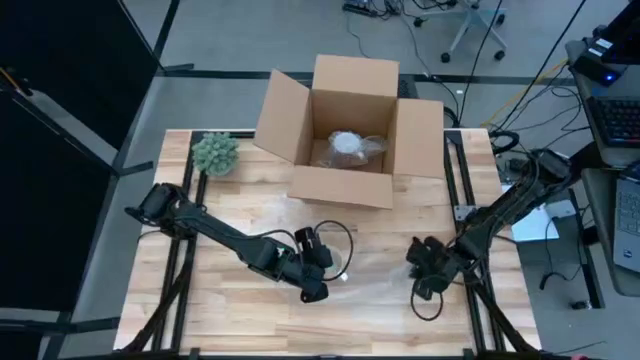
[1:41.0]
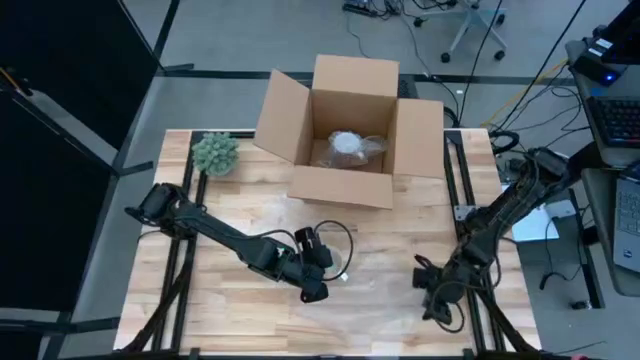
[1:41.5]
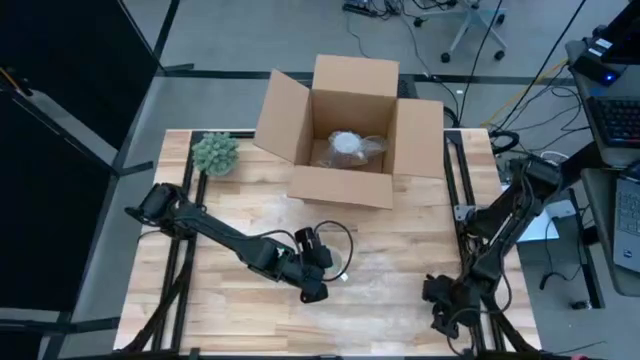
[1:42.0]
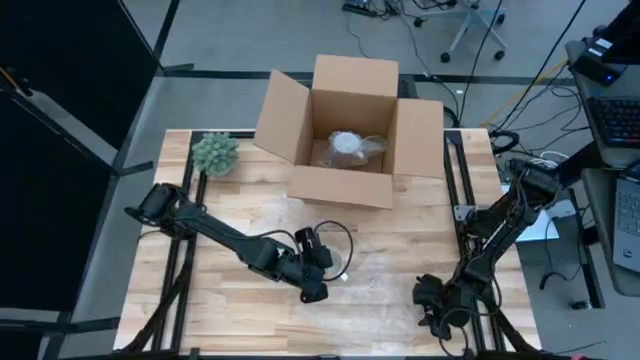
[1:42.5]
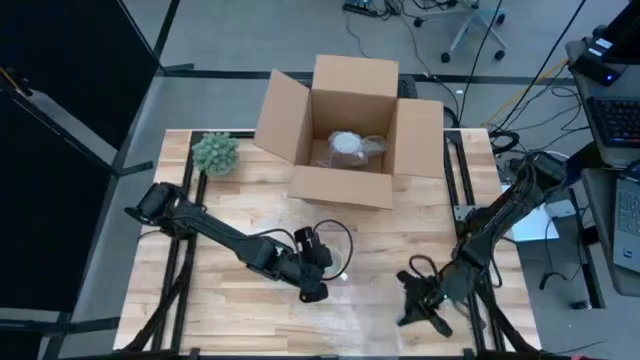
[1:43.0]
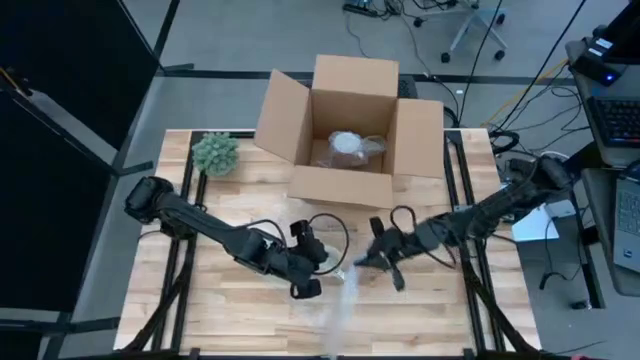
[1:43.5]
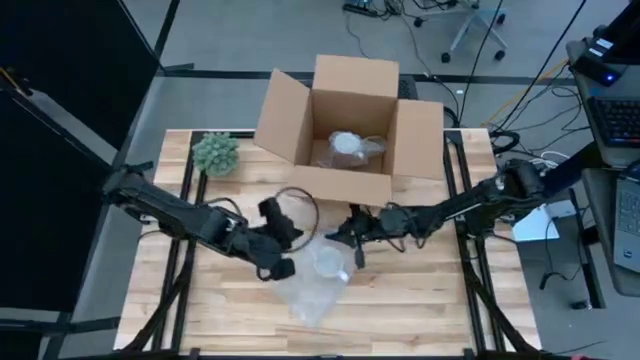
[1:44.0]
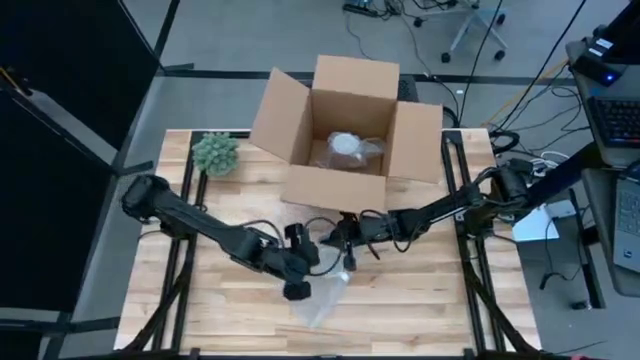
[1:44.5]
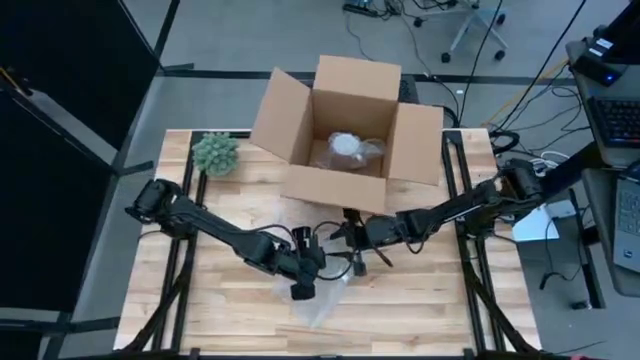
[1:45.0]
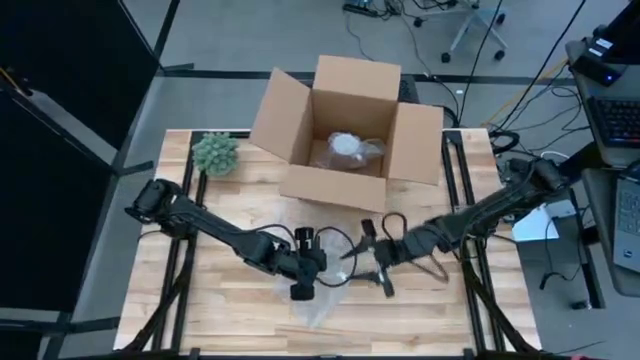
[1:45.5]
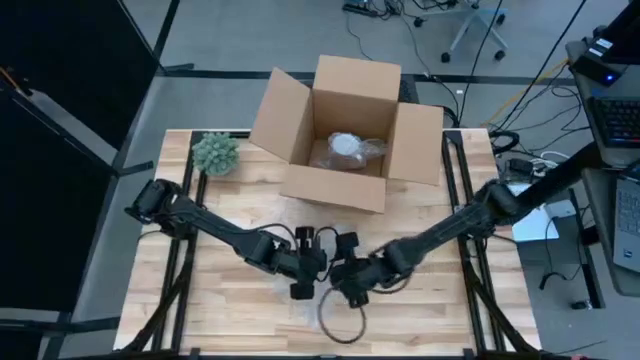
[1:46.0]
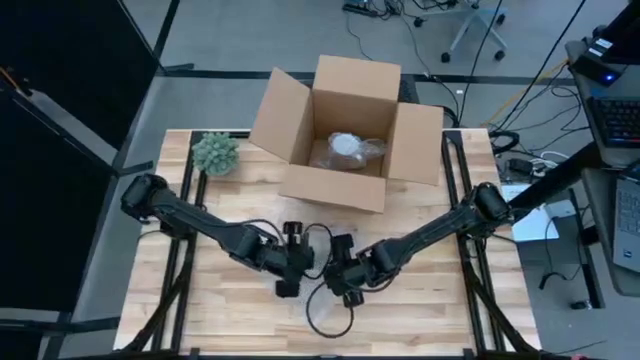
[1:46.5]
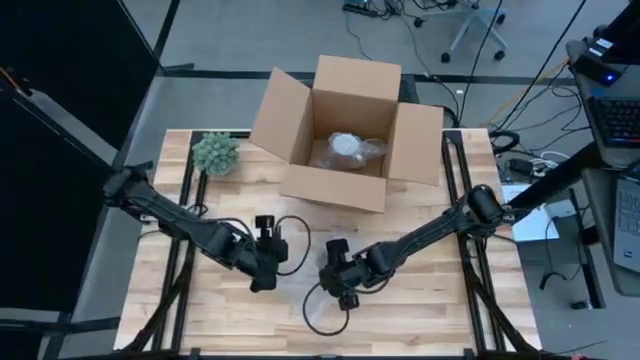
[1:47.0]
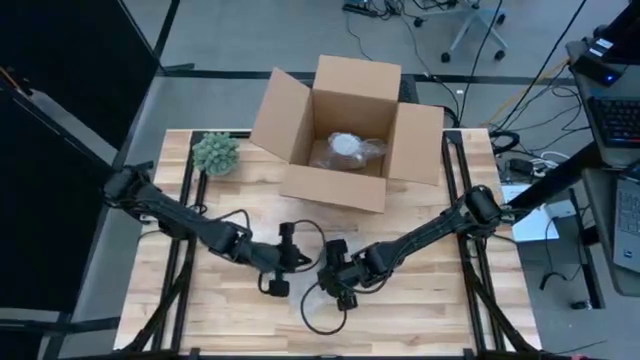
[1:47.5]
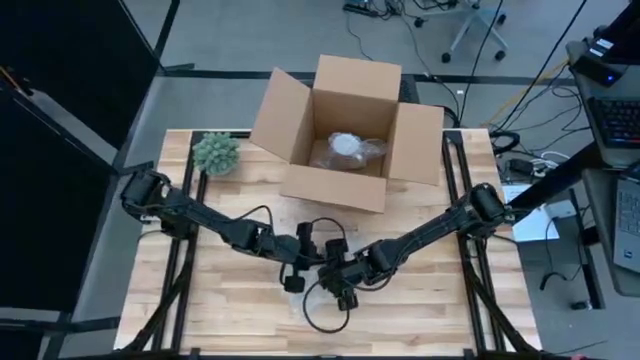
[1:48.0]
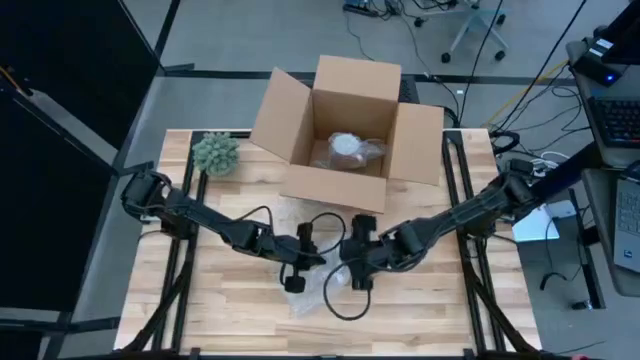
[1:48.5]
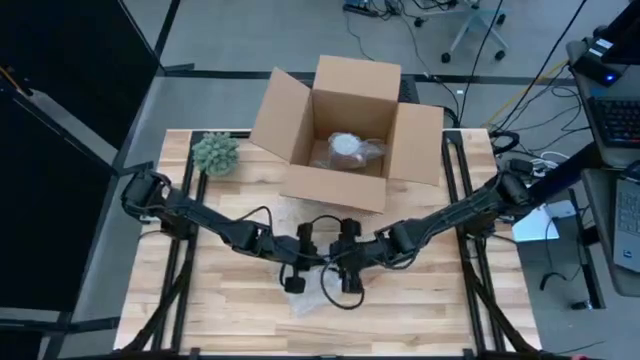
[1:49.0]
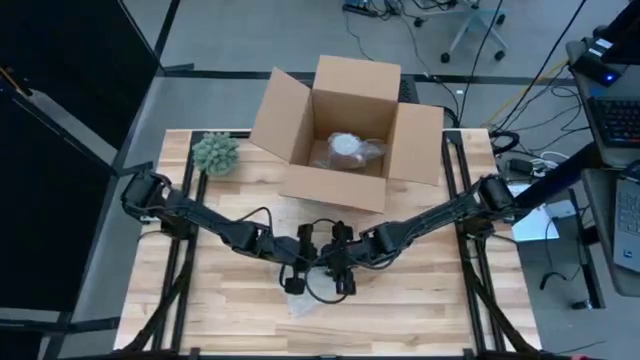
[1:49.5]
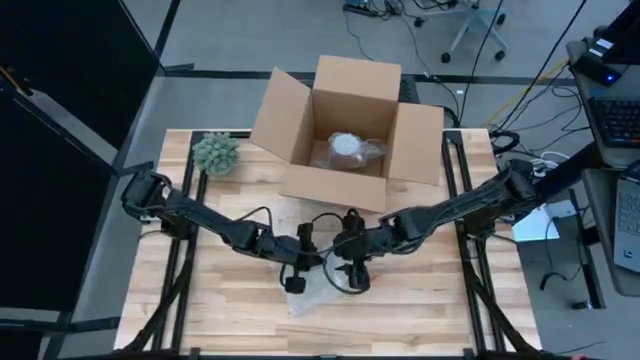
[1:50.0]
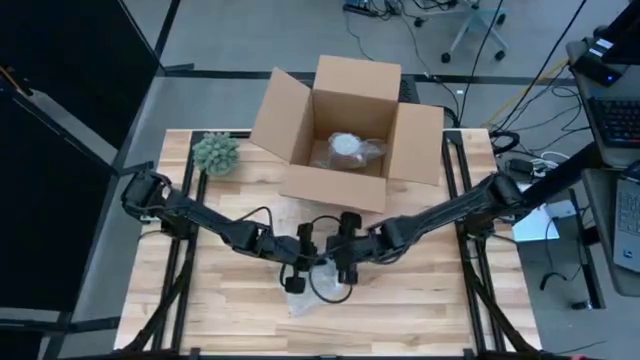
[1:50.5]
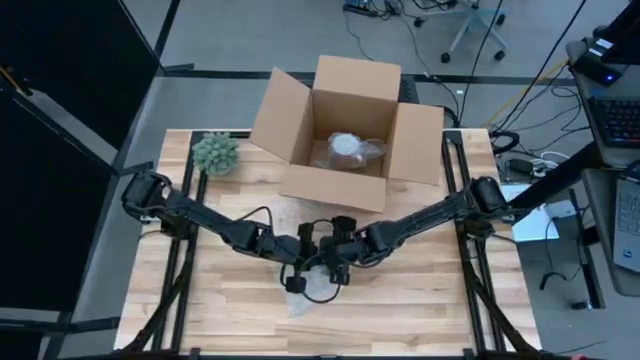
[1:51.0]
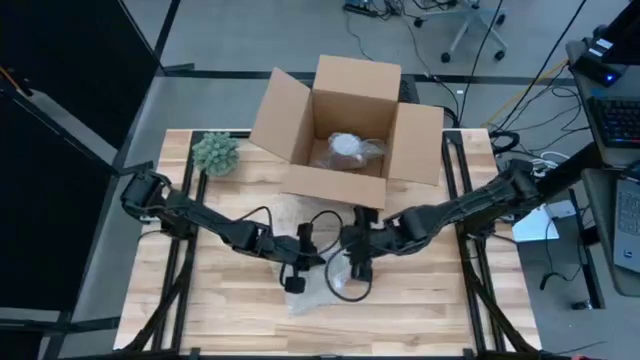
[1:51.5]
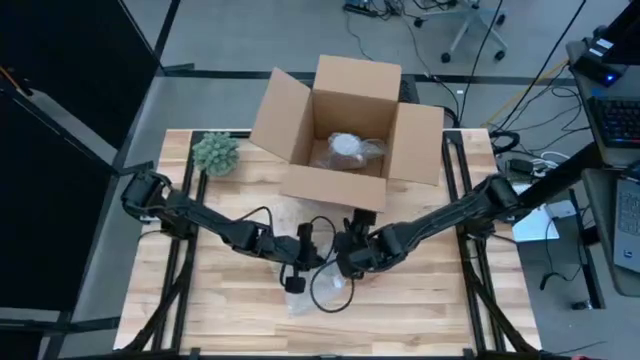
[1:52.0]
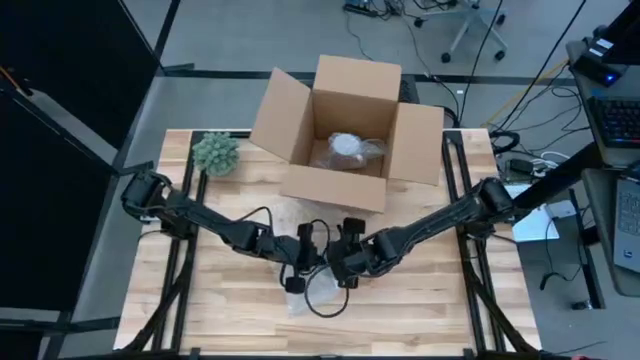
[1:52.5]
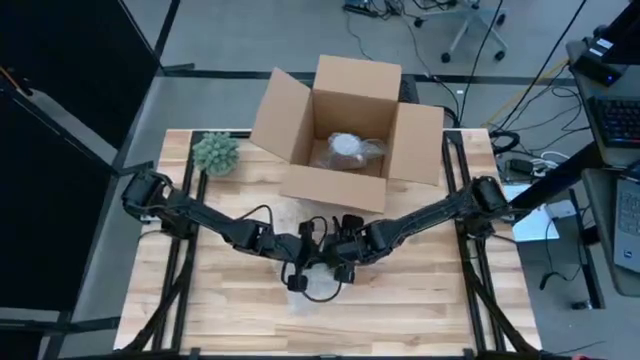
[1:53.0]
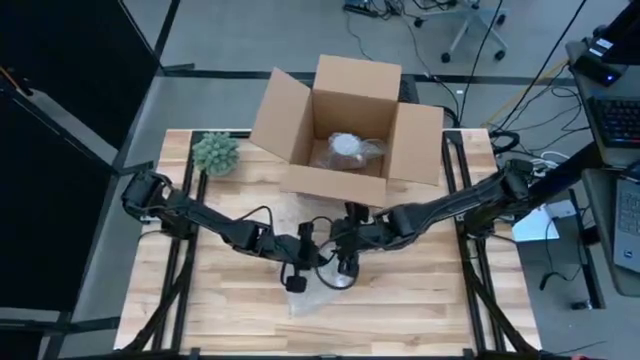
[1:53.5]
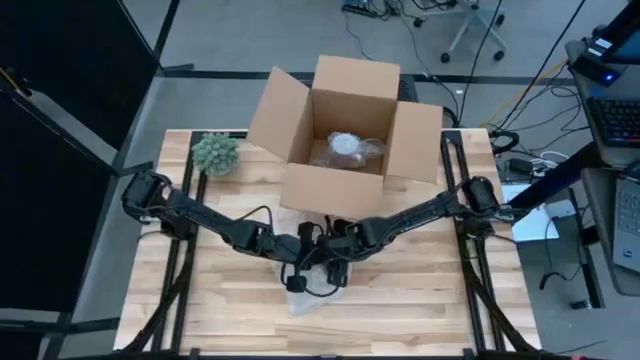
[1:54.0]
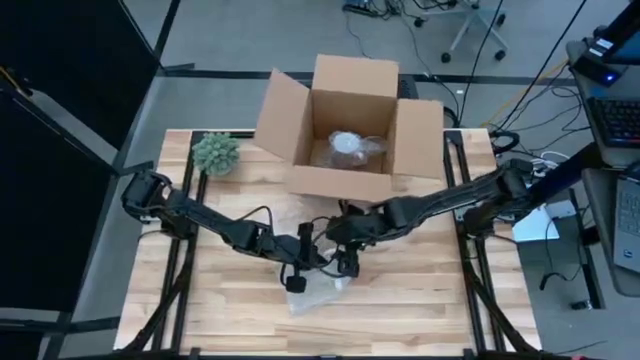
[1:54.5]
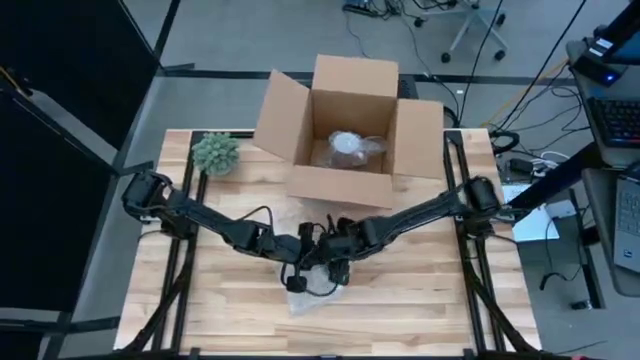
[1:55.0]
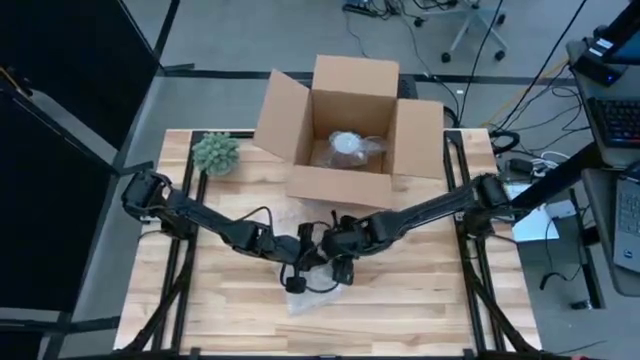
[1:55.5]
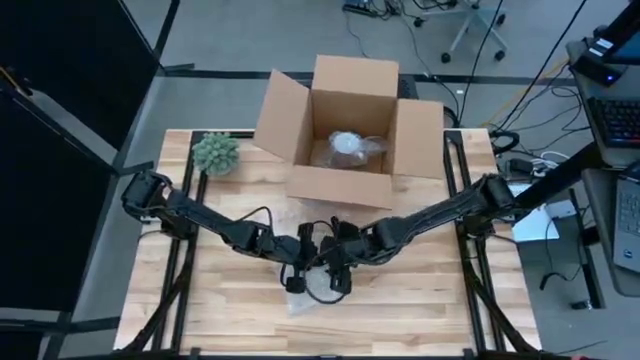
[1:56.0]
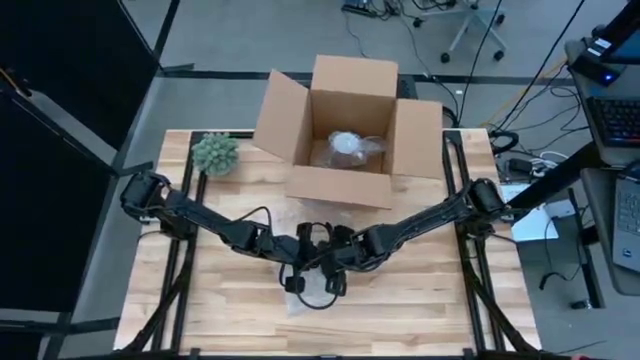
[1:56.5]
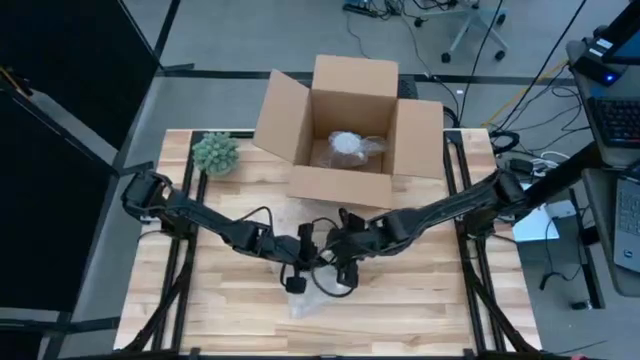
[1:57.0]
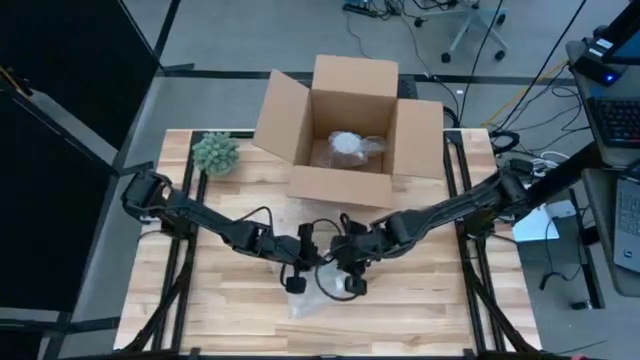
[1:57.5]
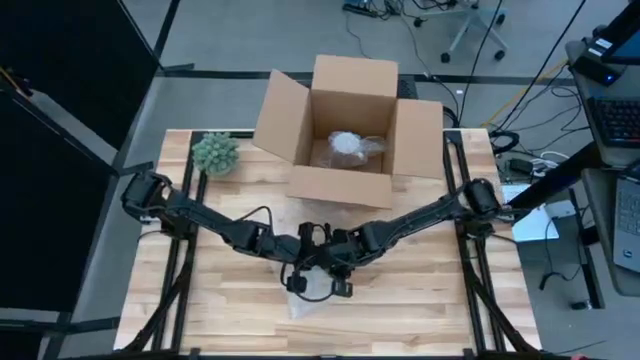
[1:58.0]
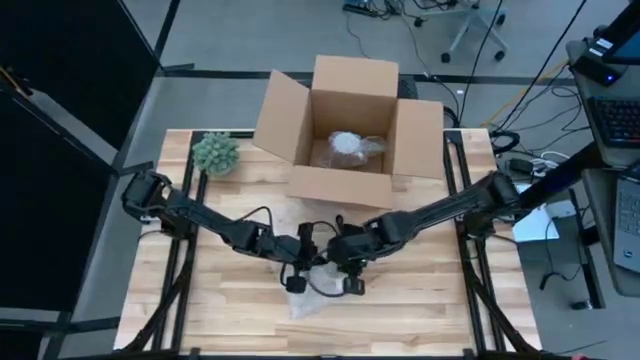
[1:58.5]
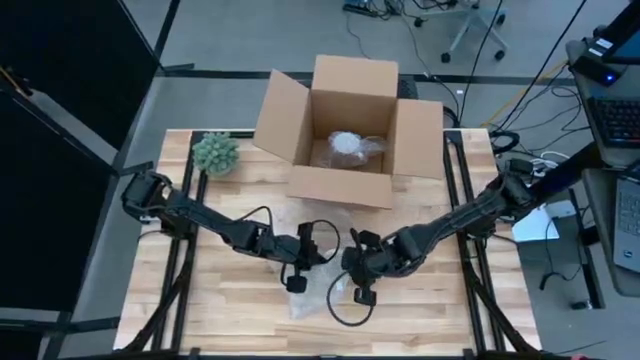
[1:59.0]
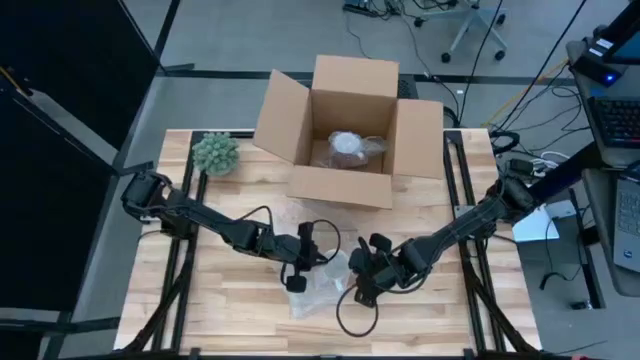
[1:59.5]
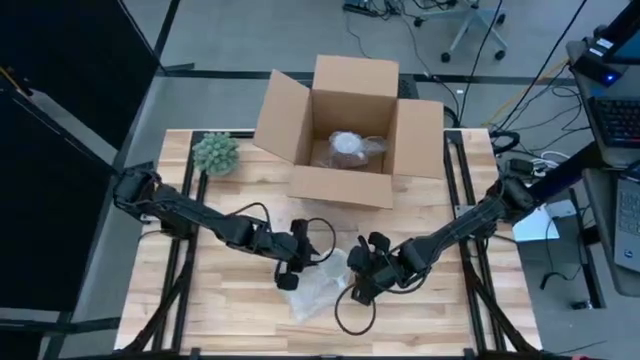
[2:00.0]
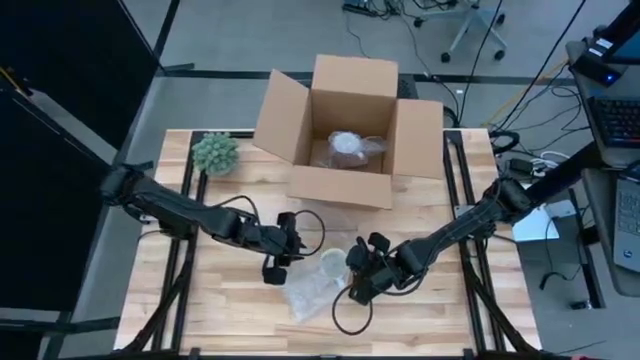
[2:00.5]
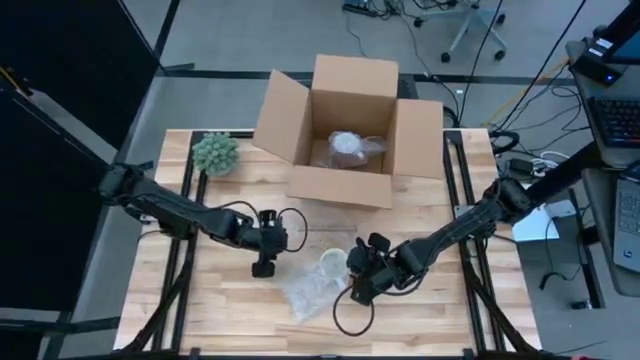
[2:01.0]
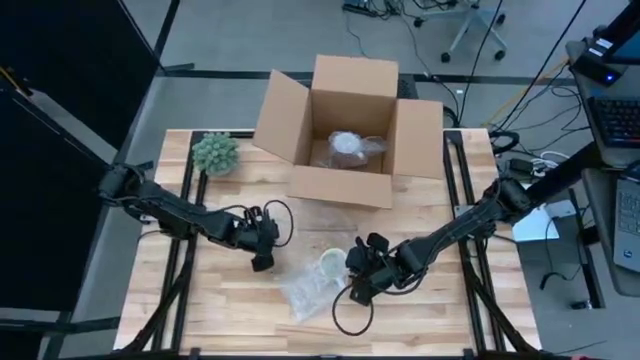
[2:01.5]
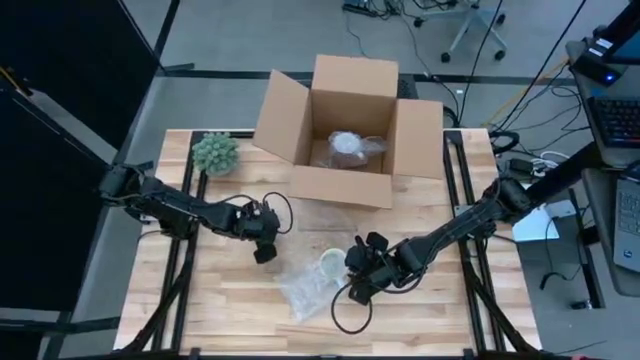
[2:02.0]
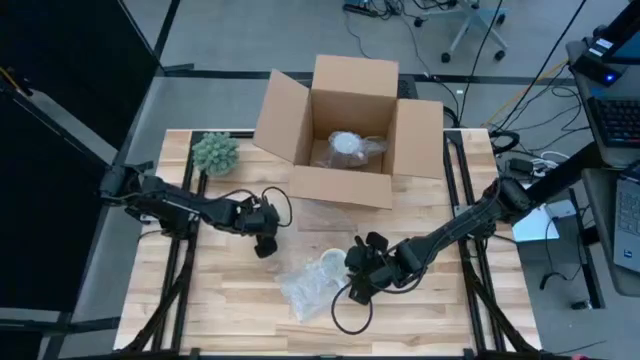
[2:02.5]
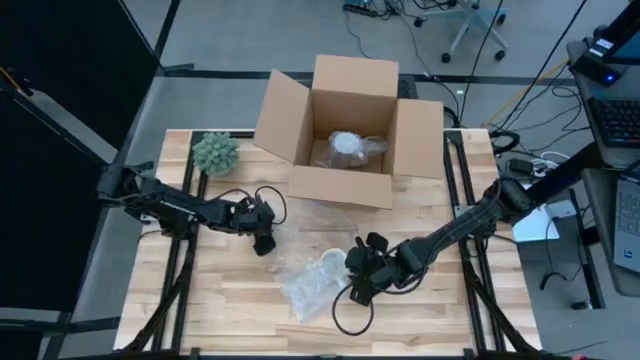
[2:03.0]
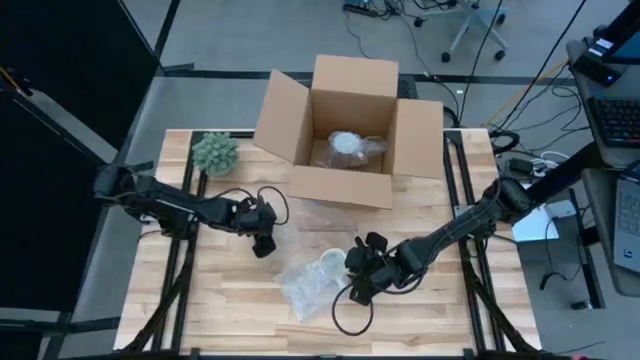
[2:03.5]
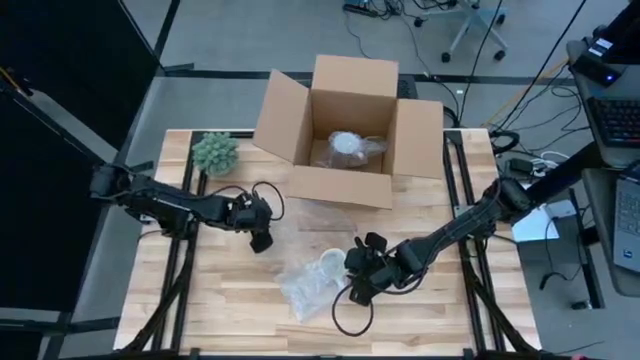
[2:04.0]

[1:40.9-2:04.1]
Task: wrap mug
Wrap the orange mug with bubble wrap
